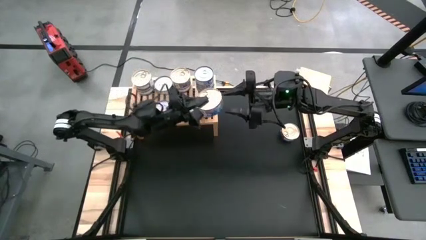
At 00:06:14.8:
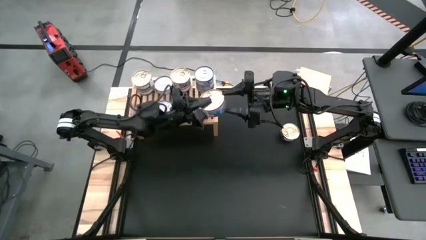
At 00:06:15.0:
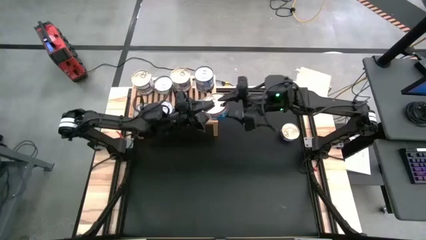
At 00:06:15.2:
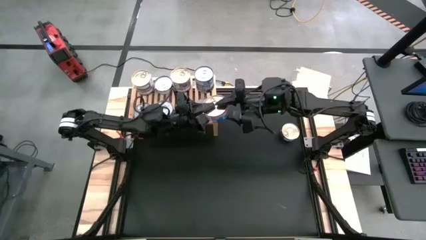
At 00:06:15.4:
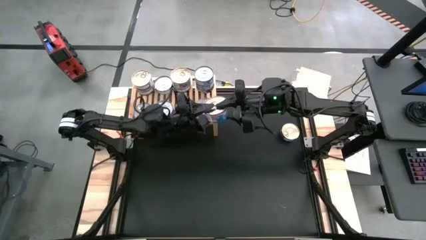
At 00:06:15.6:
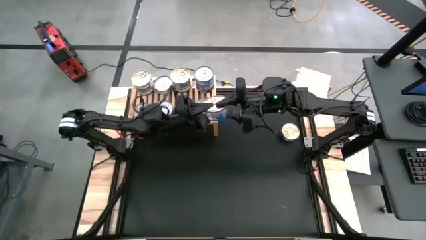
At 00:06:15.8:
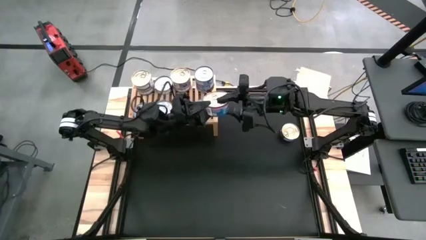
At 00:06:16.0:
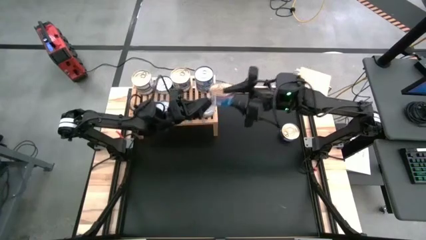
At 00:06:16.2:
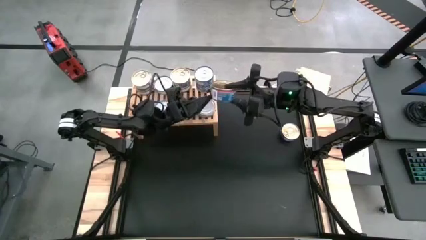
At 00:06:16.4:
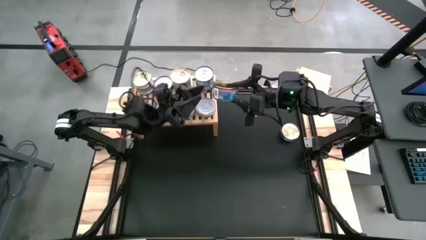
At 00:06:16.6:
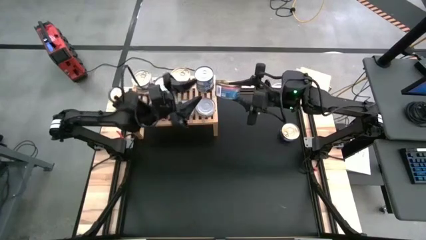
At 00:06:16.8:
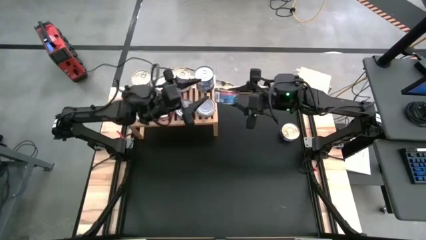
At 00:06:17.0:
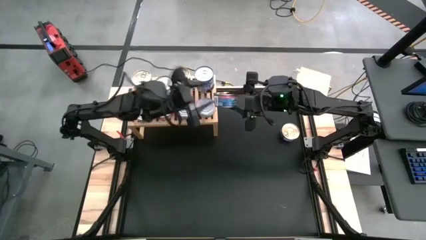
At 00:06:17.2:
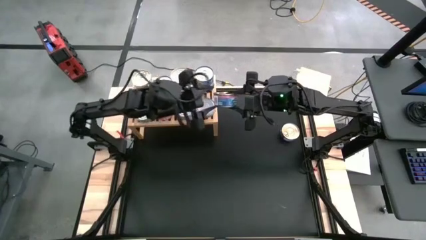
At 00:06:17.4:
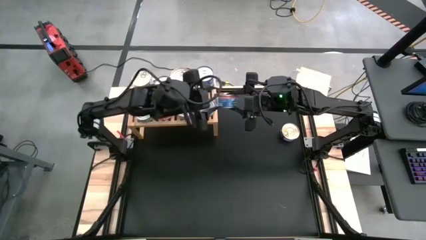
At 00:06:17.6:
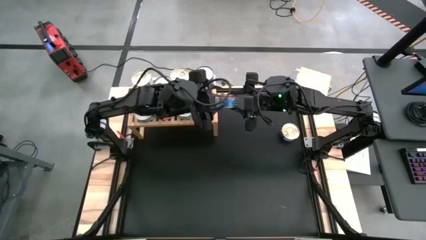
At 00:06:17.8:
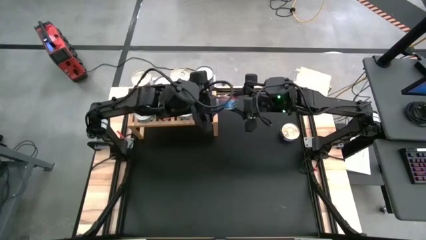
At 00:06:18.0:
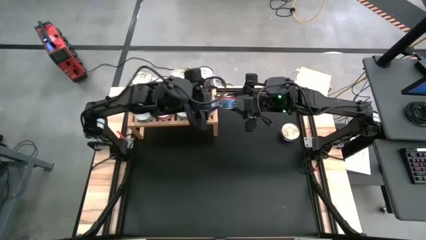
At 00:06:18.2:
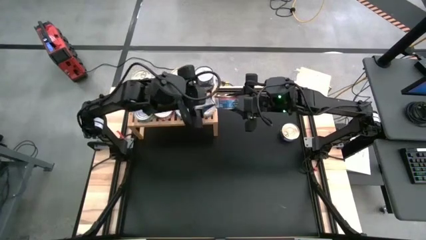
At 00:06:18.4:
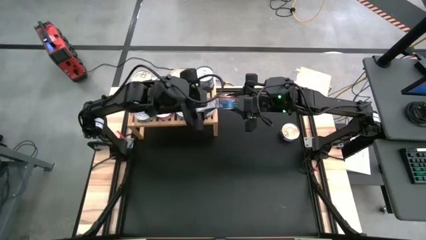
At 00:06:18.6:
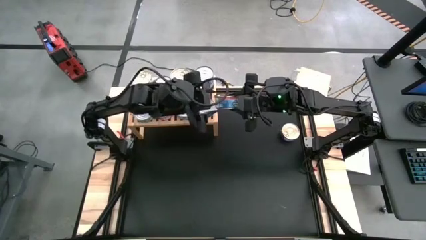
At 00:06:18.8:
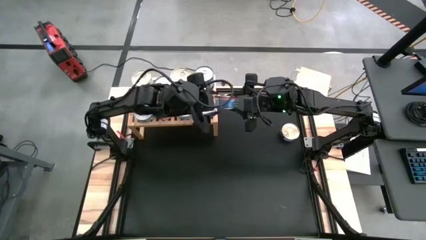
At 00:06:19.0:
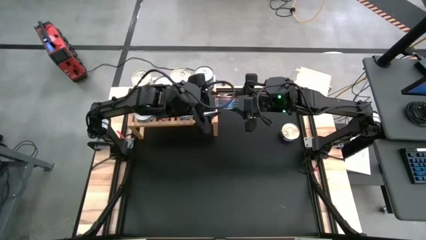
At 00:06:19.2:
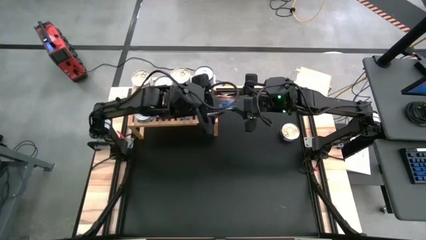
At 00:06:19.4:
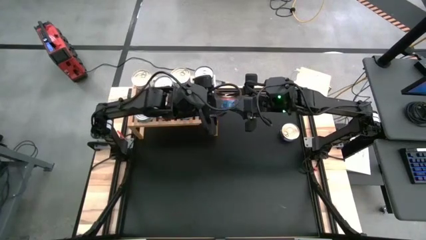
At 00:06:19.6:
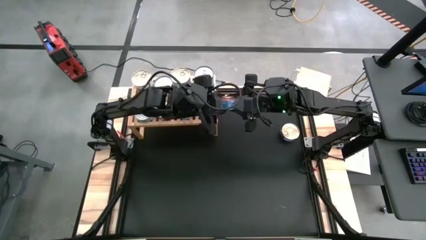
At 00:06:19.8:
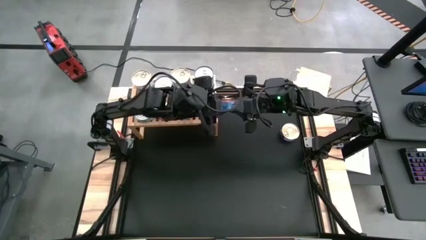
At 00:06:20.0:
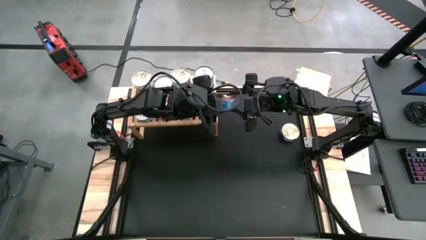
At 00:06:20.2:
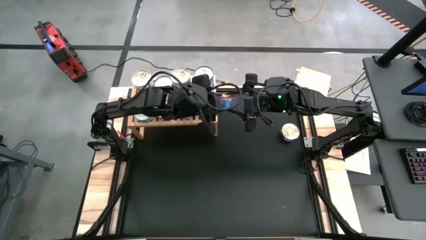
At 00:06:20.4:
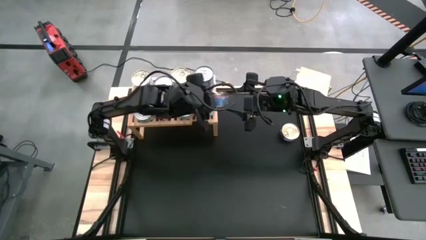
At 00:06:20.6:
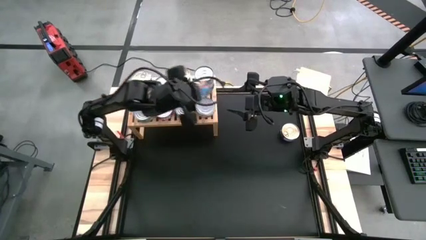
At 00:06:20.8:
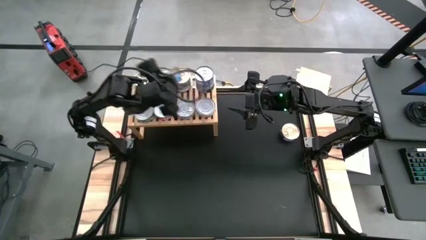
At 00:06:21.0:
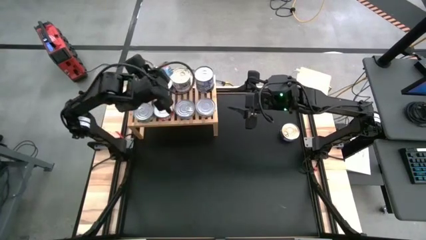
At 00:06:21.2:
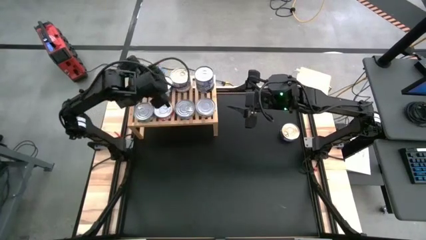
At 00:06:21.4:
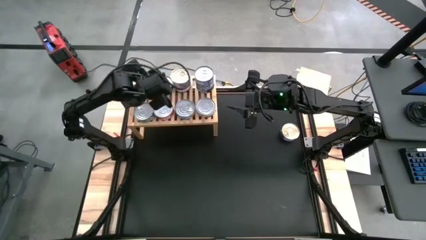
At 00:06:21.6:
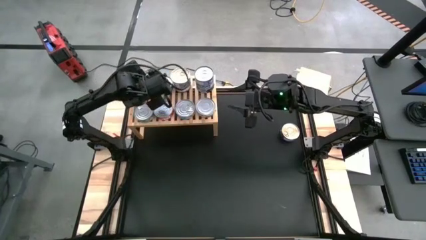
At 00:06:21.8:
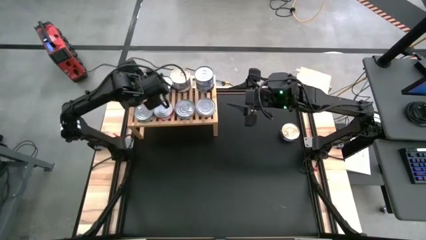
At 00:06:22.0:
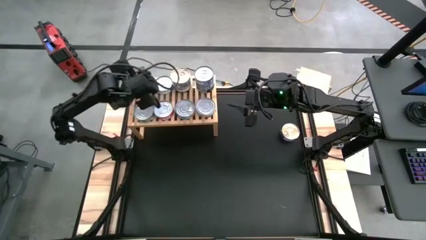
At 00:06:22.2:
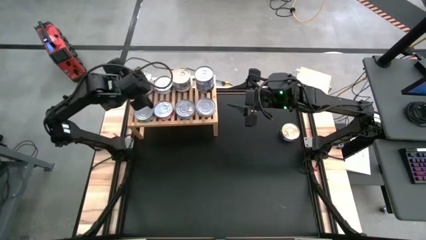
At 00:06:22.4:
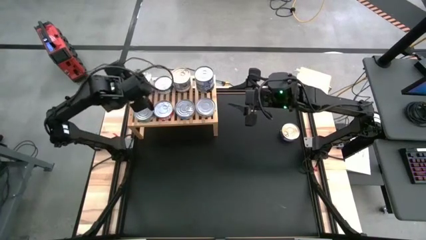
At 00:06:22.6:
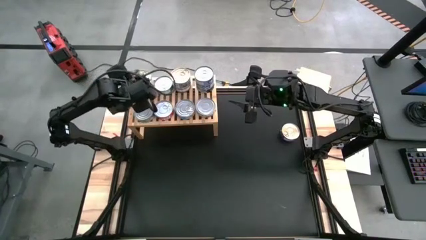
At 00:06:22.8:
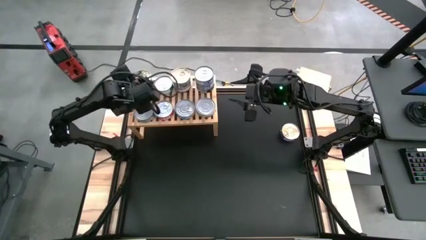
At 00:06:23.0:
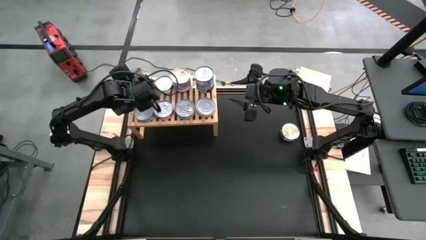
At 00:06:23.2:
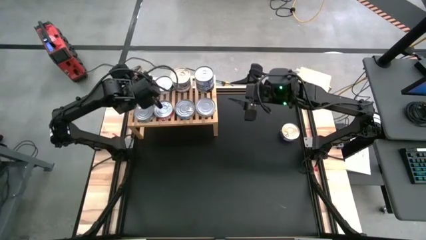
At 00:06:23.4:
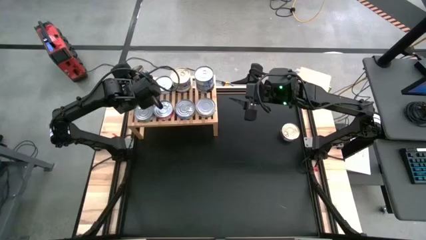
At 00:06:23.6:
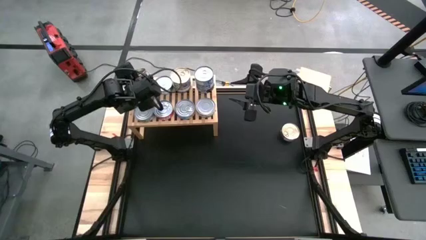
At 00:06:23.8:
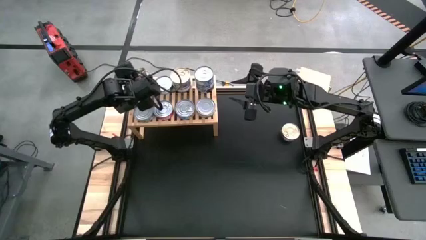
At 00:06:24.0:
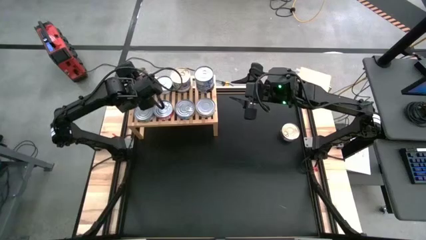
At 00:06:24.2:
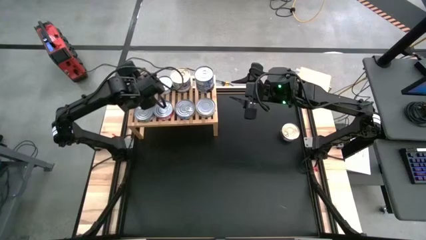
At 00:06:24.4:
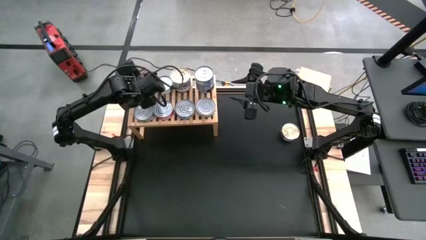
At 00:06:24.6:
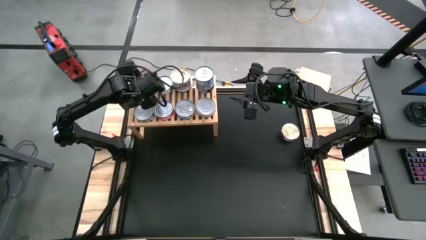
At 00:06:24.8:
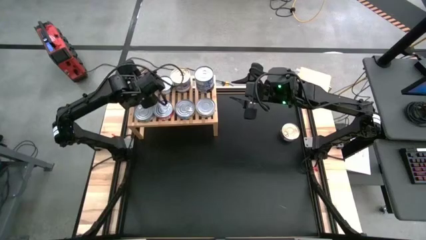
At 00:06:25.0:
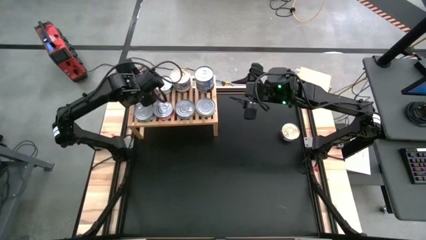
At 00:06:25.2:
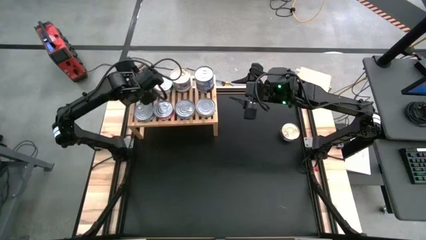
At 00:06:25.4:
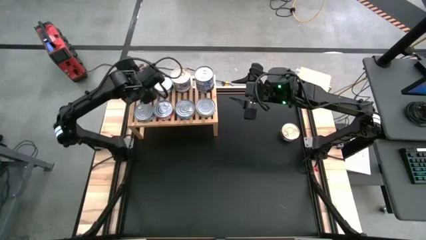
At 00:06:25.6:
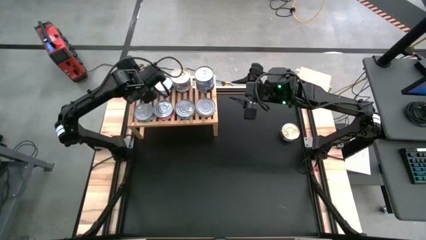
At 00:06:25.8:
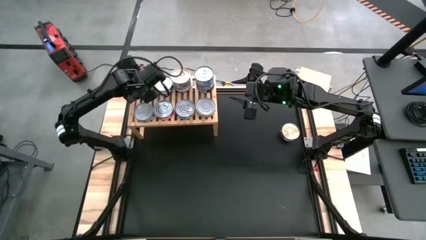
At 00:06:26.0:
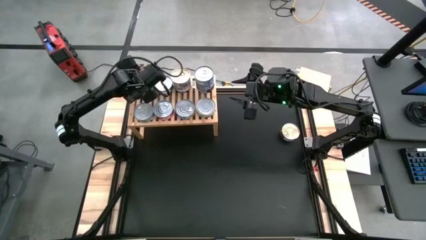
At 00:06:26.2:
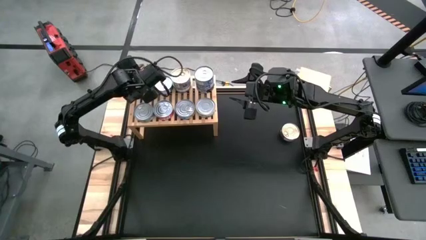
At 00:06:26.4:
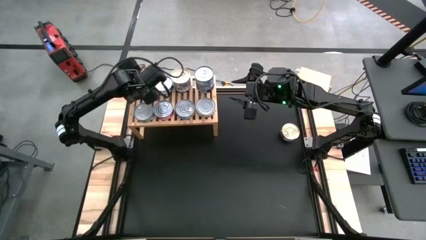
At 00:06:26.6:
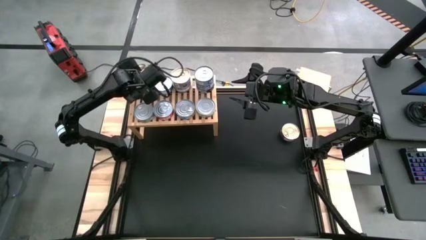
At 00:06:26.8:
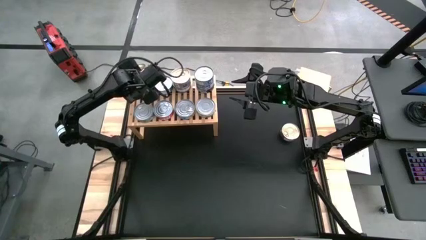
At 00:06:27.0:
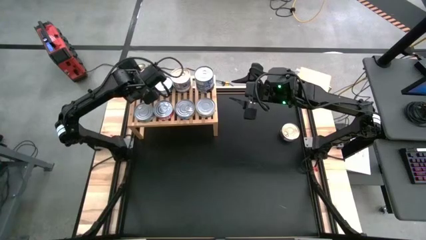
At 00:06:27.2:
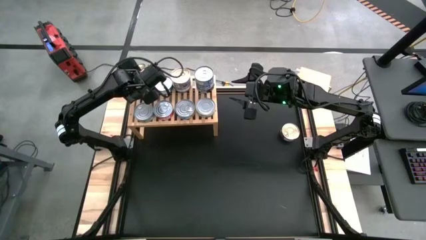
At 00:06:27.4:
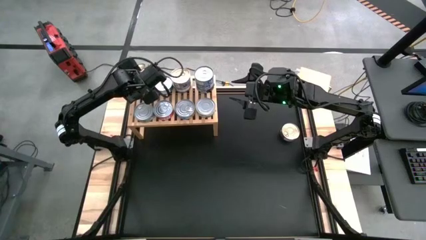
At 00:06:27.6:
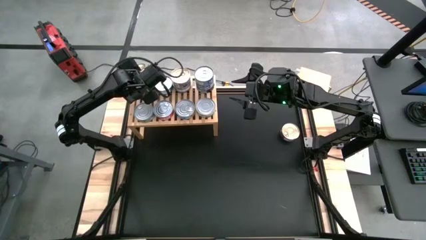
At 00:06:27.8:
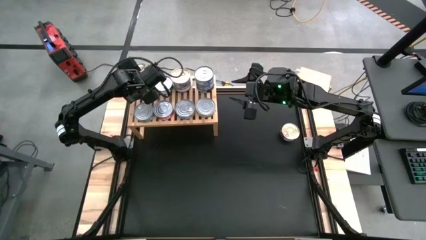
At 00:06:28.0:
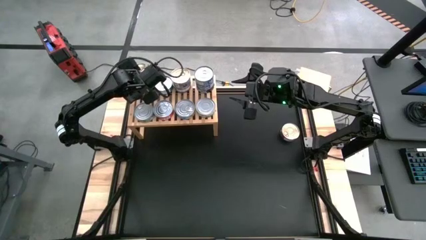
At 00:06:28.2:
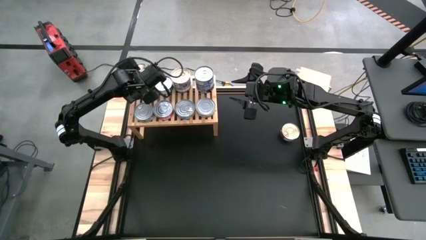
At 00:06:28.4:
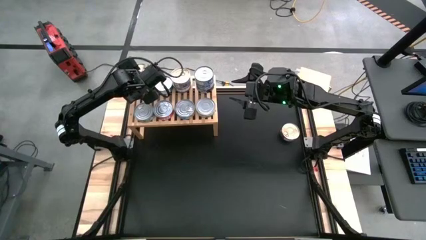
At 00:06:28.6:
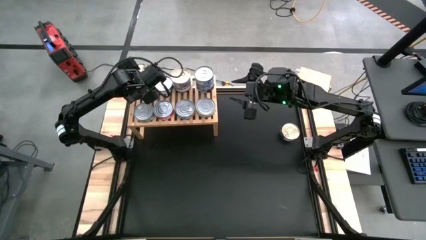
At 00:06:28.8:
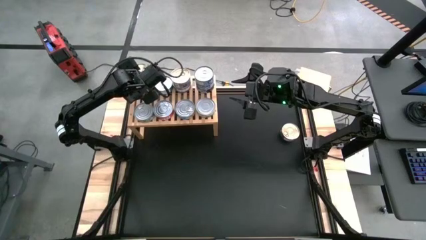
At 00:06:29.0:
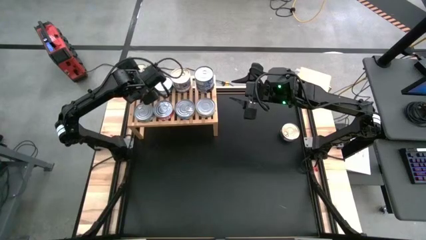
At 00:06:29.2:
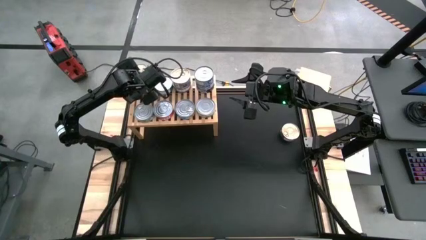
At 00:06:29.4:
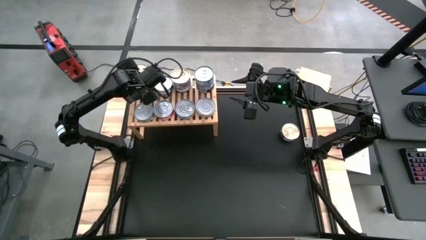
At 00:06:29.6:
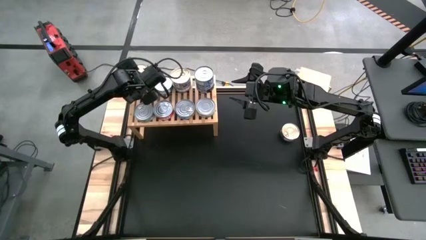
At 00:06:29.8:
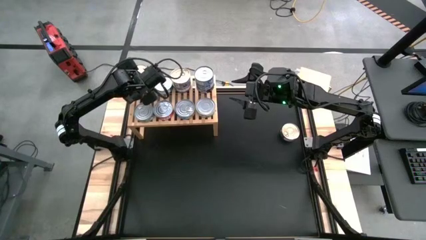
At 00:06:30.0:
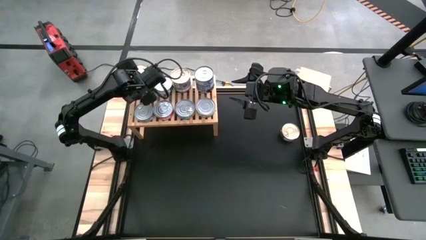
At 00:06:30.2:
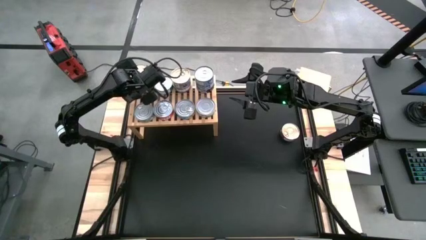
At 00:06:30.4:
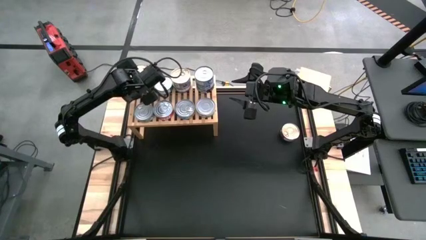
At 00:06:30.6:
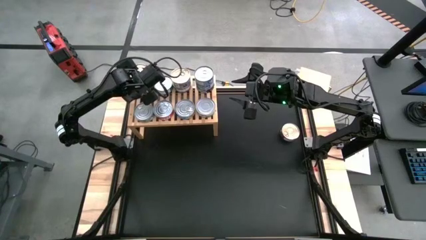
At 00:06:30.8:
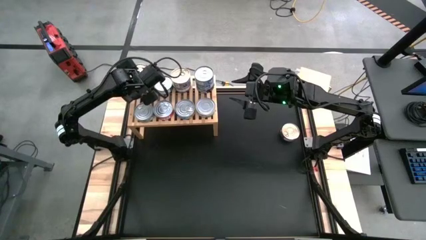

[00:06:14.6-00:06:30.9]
Task: Stack canned seafood by type on shelf
Stack the blue pink tuna can on top of the other blue pink tuna can on the shelf
